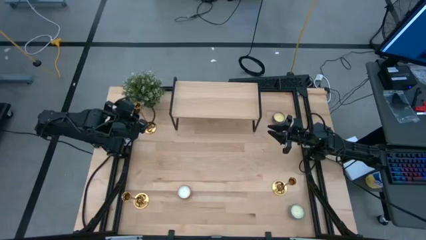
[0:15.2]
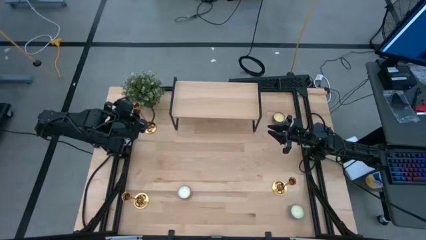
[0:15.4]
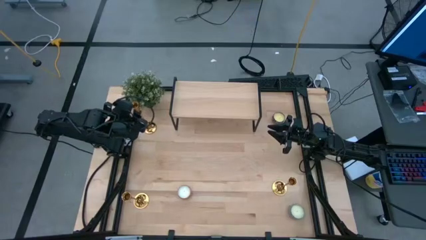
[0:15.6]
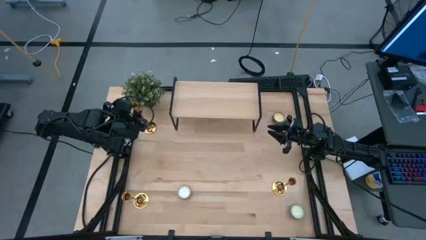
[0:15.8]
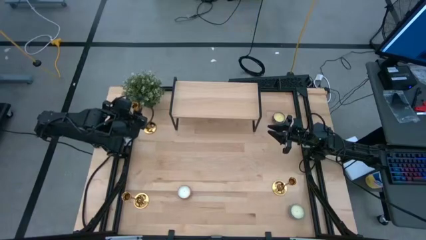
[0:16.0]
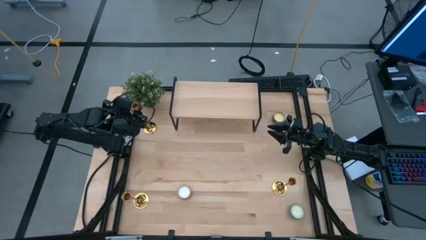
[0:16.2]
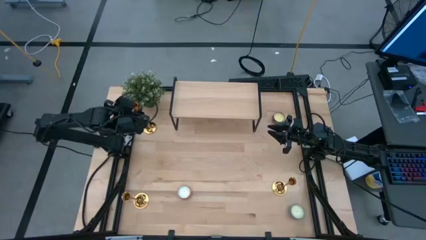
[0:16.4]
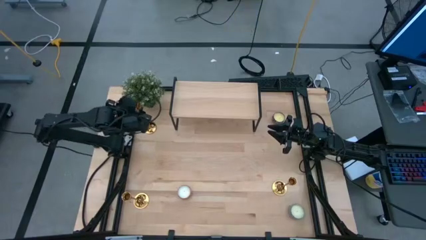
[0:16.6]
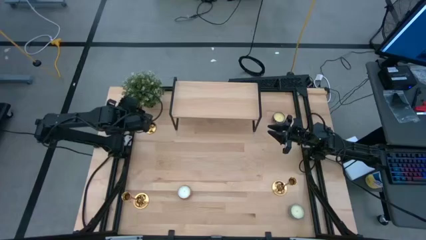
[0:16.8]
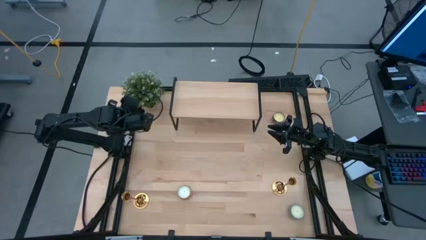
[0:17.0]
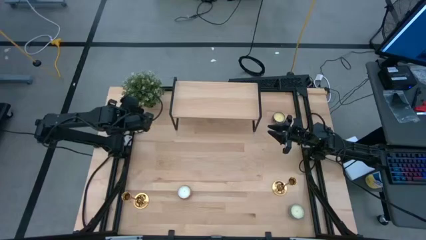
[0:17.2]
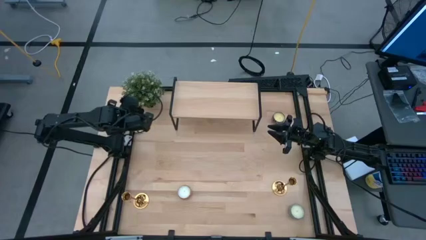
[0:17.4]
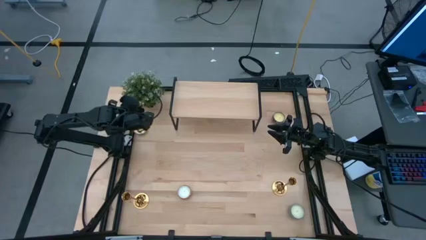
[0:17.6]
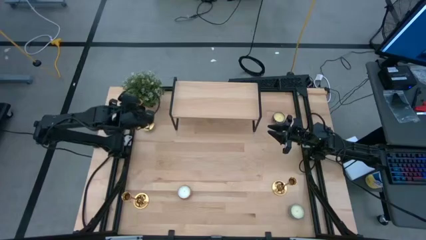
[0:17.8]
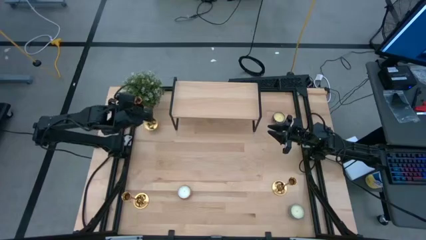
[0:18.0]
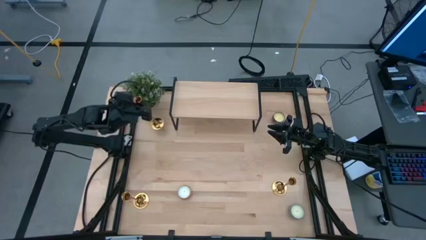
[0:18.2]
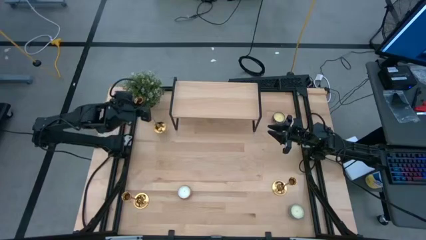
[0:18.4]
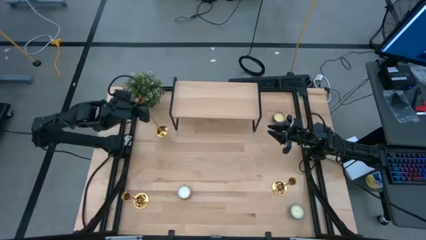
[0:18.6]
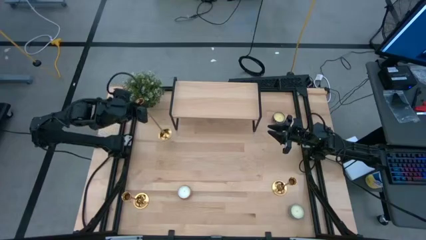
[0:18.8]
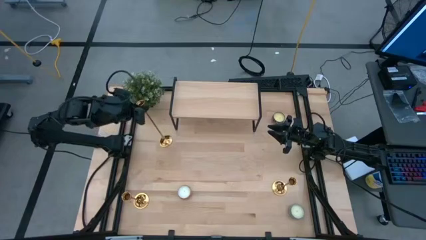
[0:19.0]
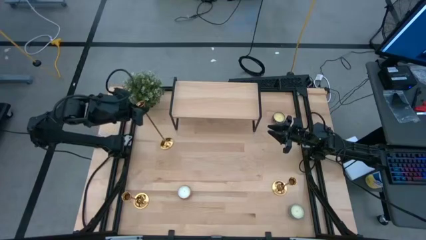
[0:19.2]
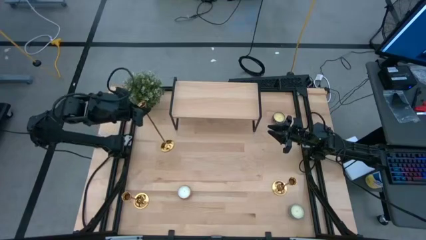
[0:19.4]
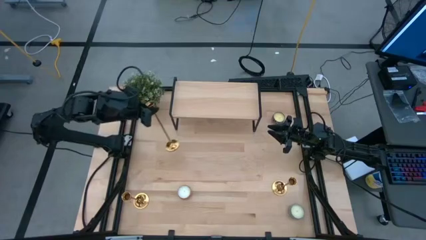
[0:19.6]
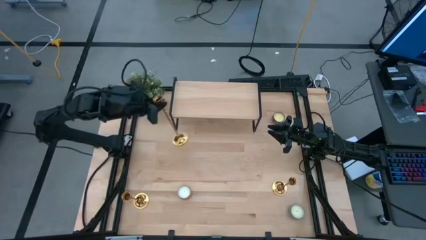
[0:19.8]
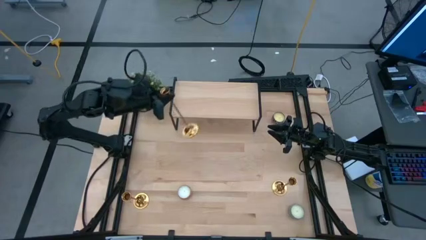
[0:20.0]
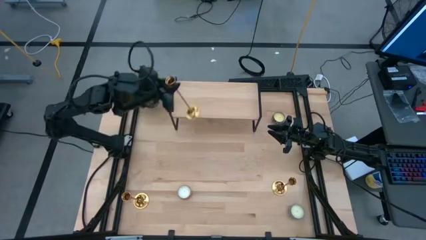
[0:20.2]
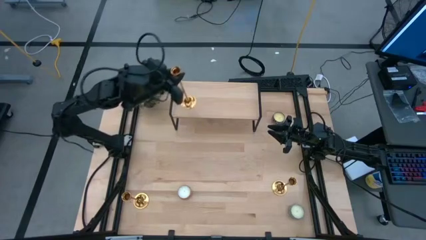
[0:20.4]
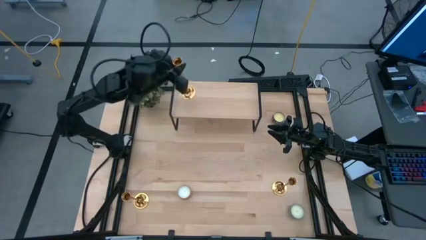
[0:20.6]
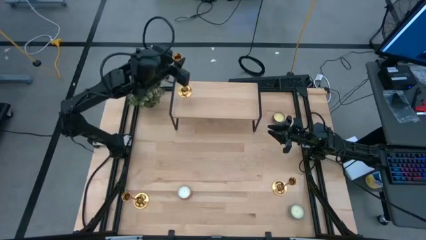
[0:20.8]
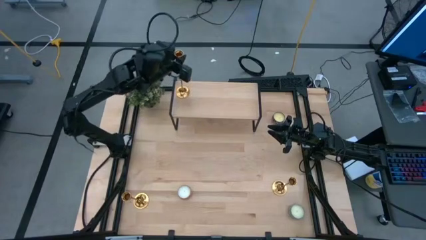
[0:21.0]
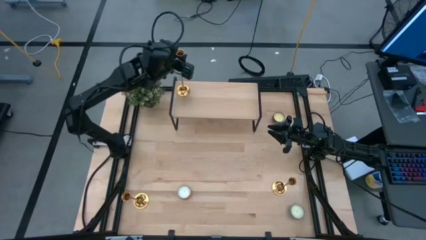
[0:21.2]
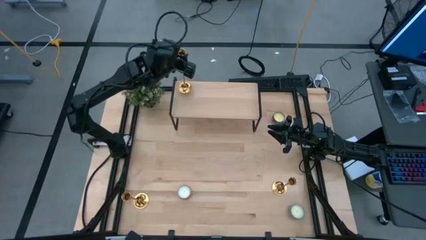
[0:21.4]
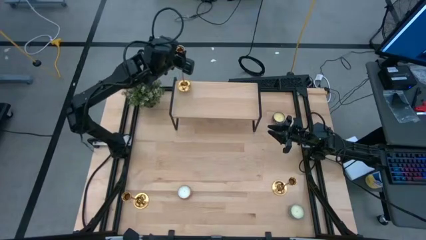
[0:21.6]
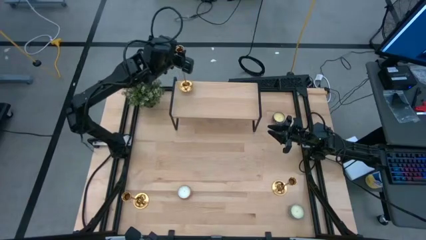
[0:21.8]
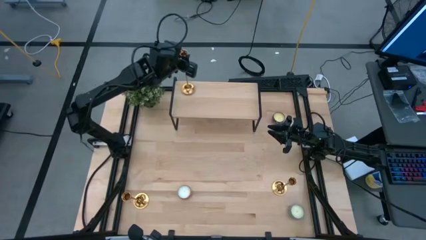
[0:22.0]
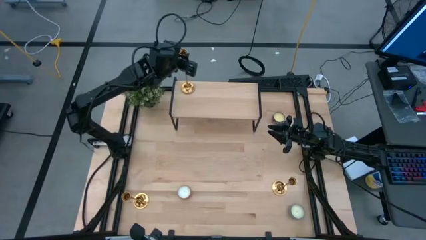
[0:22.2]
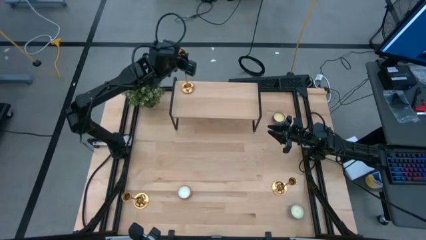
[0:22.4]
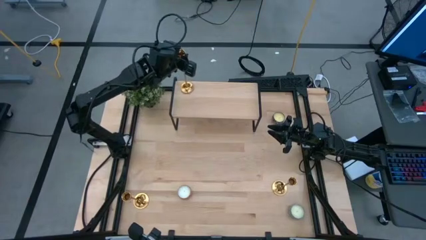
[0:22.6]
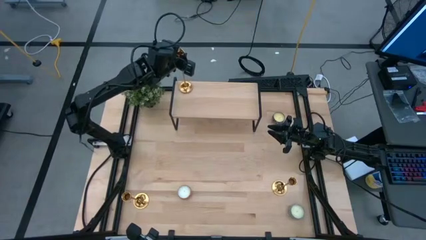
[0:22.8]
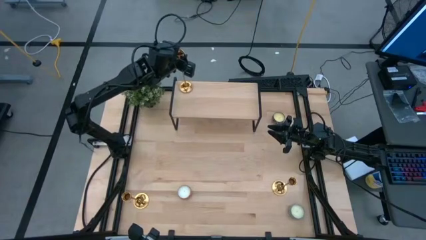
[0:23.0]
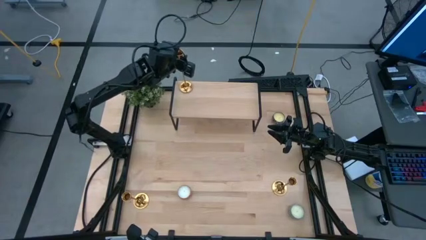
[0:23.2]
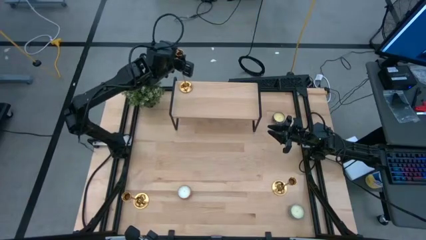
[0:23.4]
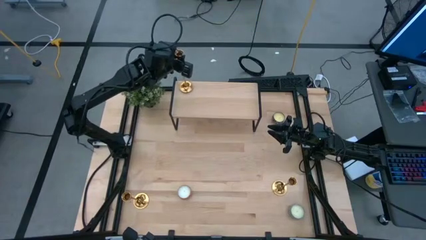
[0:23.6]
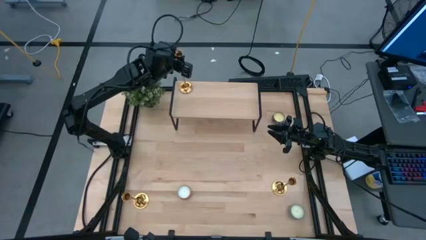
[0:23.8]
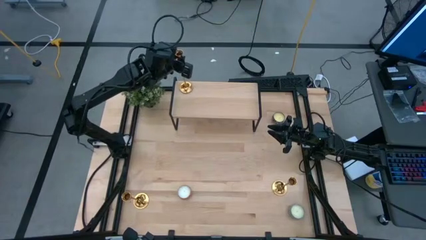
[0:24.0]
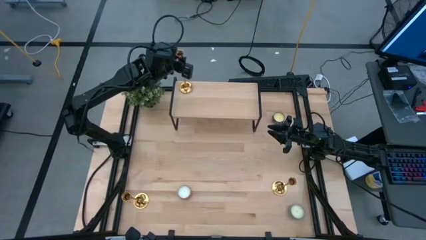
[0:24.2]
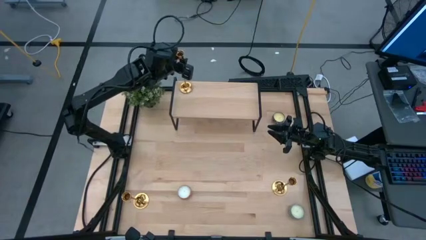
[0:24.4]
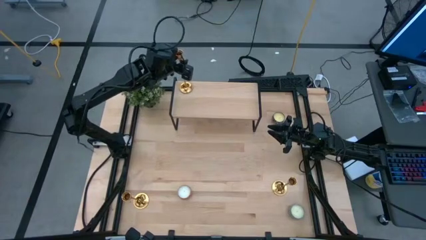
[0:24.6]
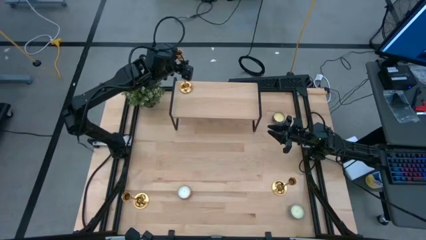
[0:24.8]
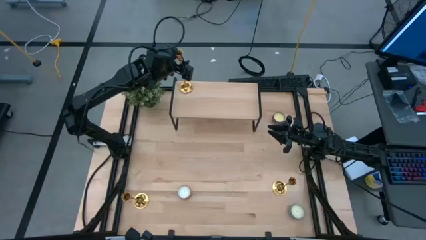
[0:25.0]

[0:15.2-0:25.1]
Task: Pick & Place candle stick holders
Put the top left gold candle holder on the shelf

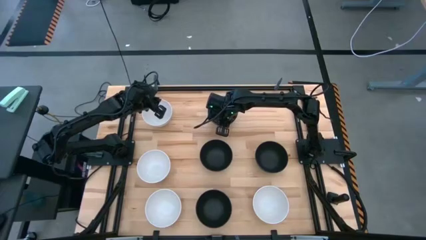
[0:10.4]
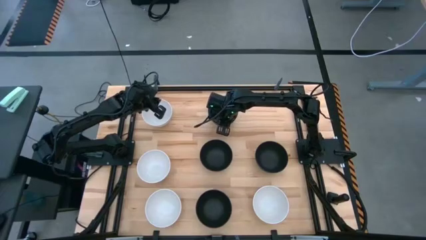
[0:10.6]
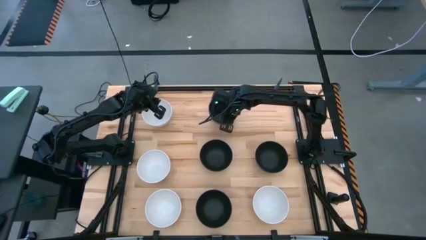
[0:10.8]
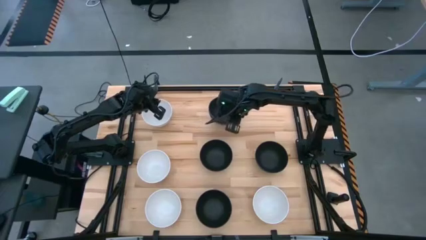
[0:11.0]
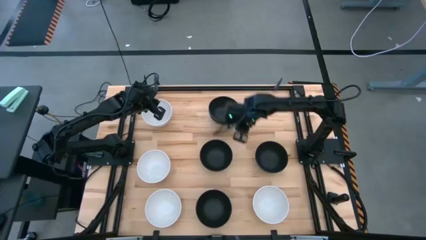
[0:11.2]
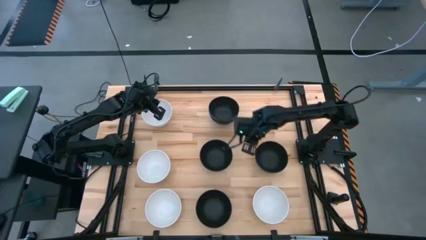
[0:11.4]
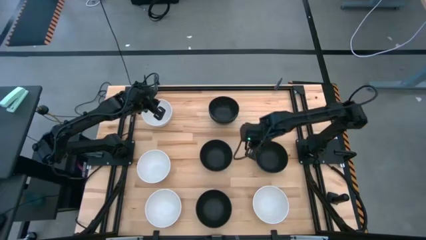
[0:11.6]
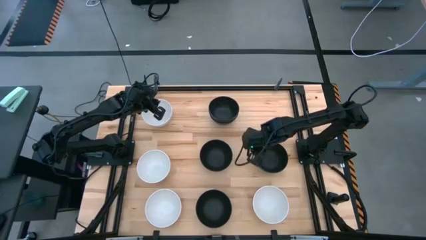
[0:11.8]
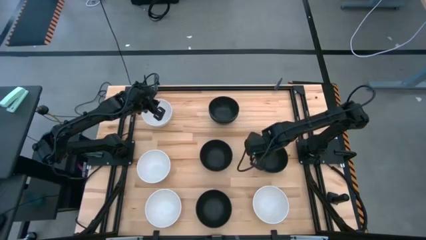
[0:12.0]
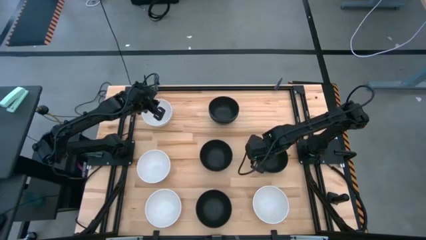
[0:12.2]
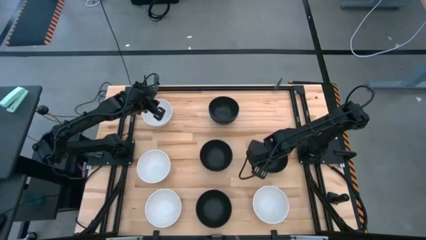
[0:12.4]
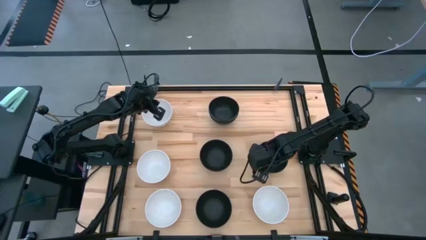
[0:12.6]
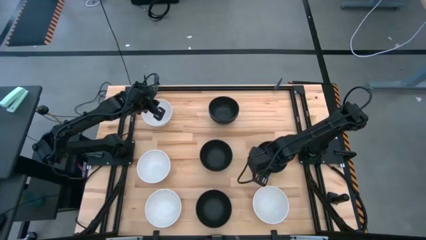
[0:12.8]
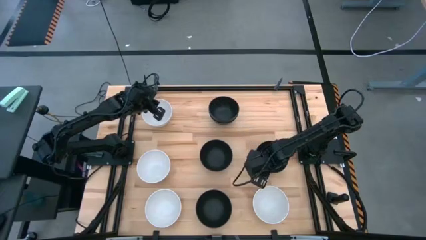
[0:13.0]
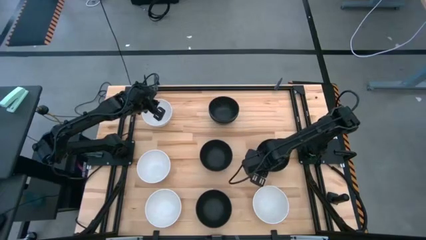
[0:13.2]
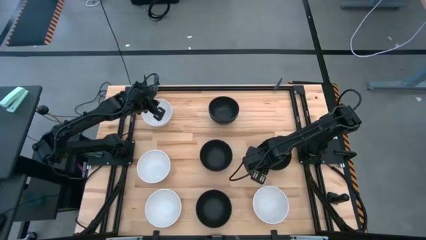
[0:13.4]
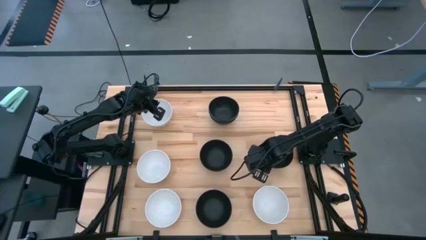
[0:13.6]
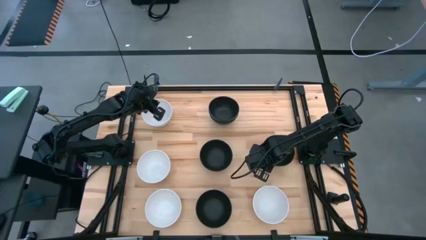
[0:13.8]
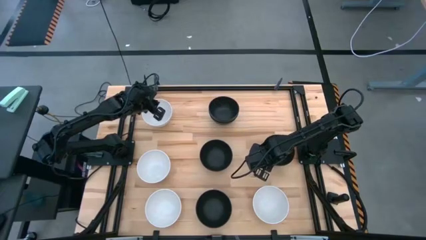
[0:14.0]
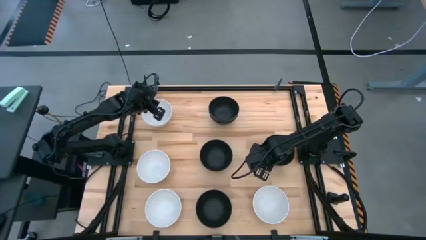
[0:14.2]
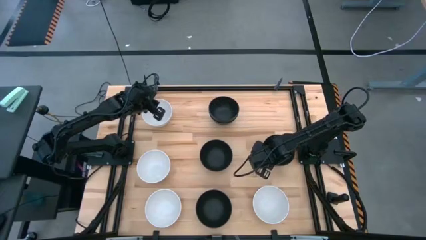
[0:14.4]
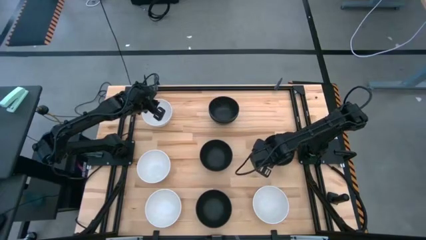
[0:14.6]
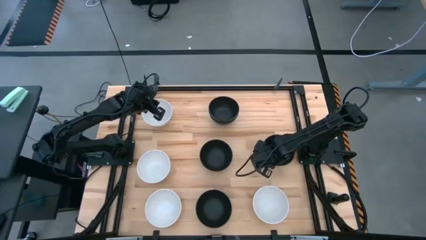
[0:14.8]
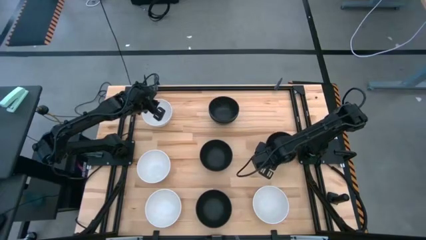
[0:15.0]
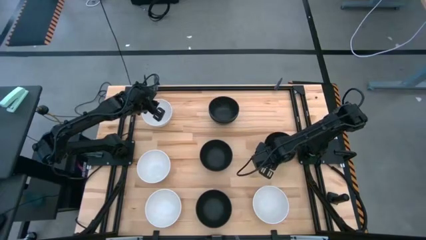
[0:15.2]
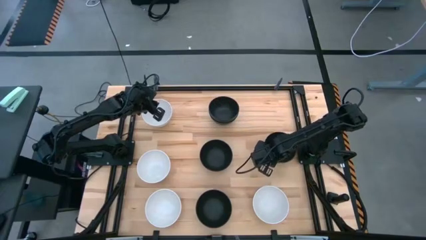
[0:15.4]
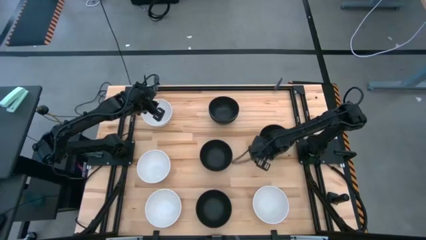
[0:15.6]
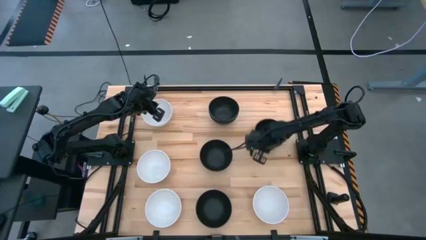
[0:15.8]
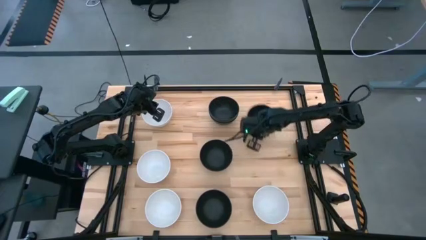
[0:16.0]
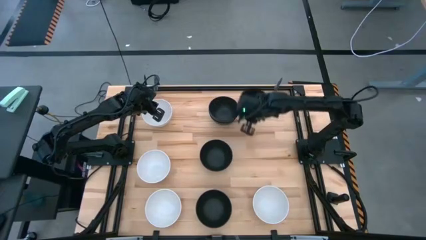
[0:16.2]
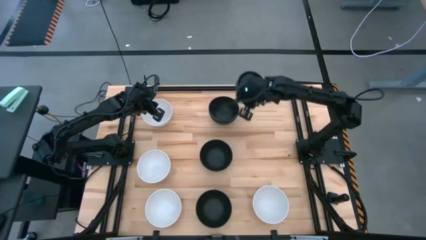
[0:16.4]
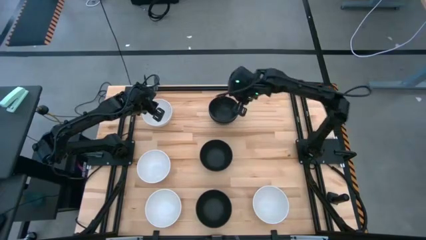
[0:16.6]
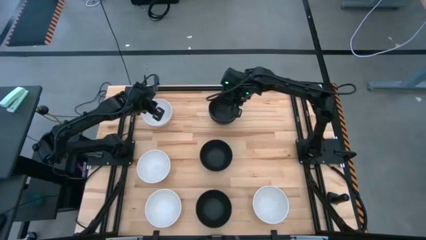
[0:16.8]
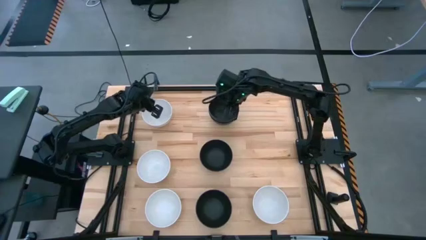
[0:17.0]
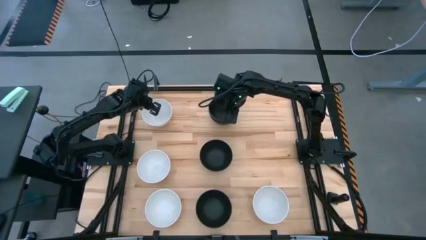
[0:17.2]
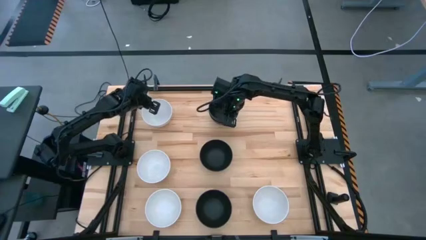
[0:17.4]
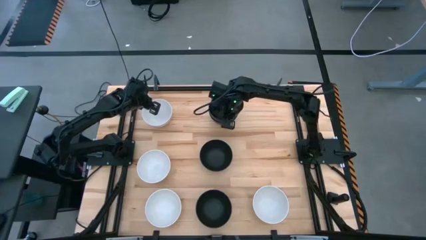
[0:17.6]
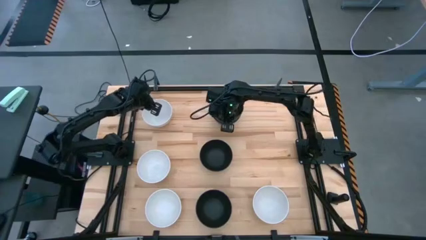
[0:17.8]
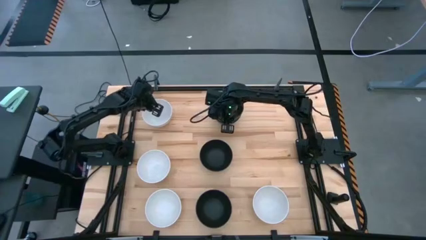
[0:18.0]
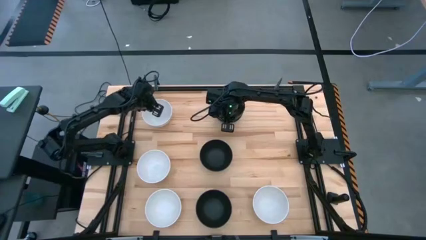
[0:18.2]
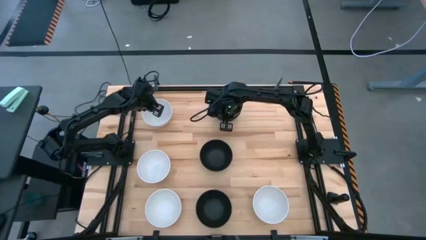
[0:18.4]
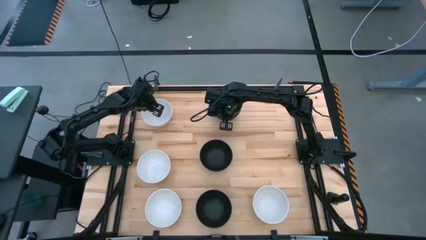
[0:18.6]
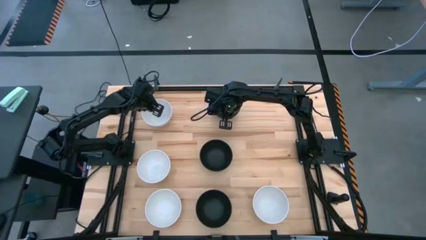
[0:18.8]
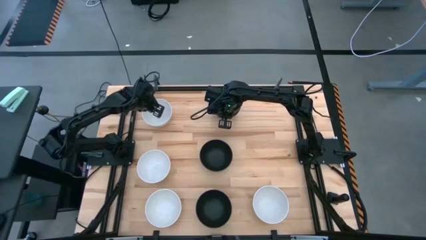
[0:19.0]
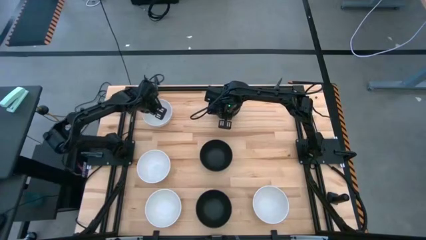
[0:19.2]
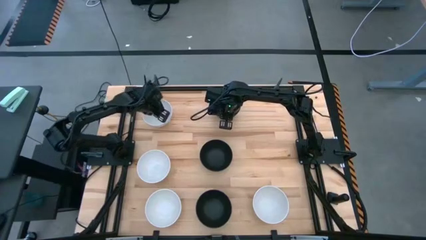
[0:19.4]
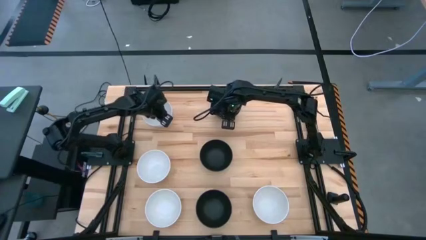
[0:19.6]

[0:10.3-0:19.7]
Task: Nest bowls inside each other
Stack the black bowl on top of the stacked black bowls
